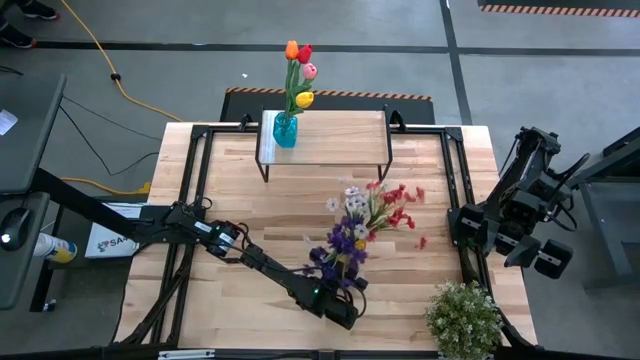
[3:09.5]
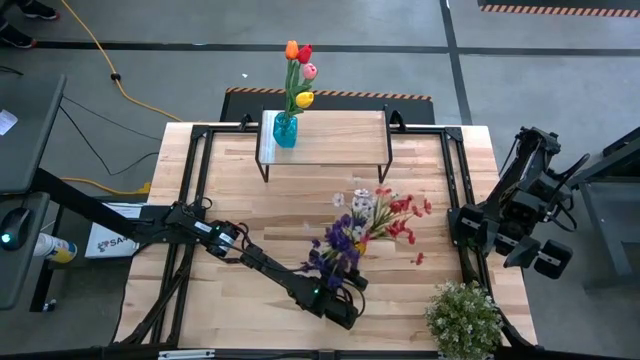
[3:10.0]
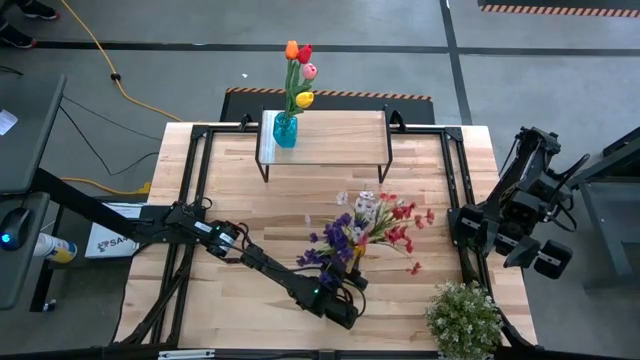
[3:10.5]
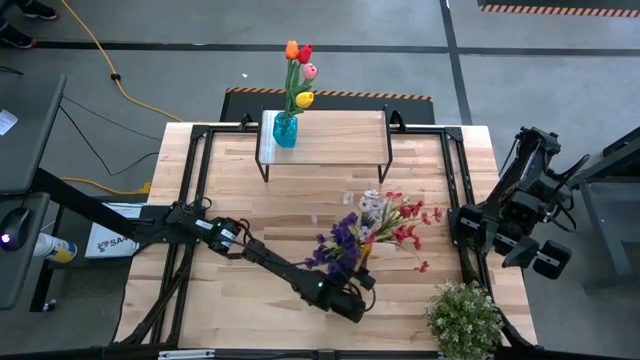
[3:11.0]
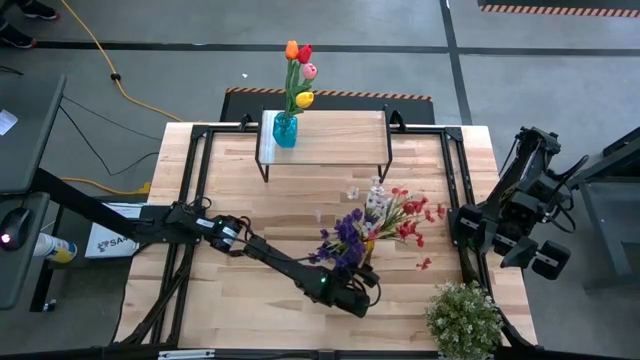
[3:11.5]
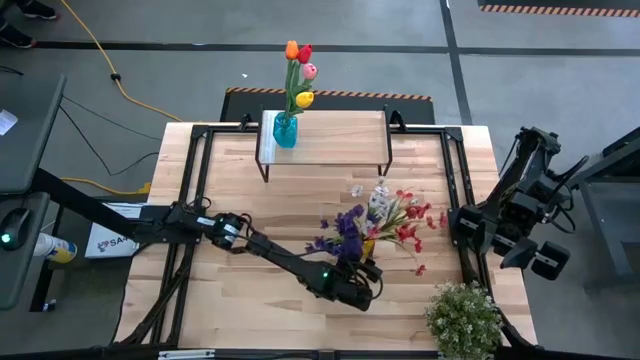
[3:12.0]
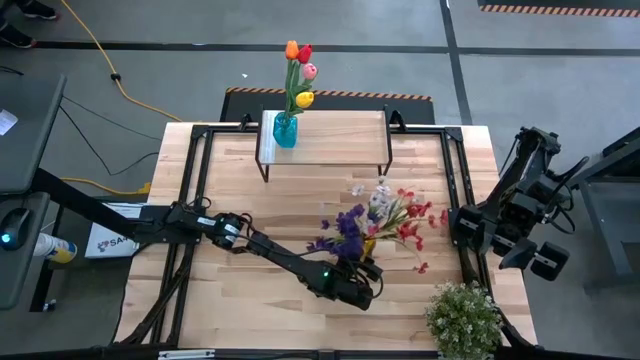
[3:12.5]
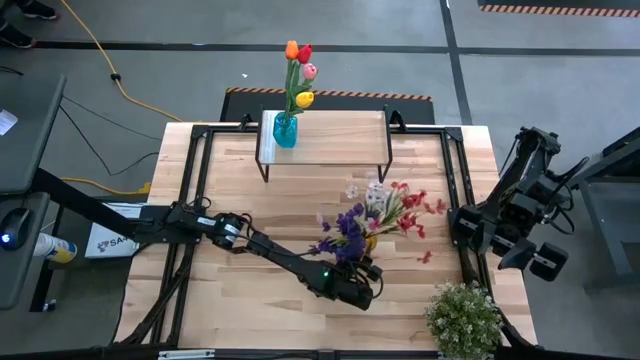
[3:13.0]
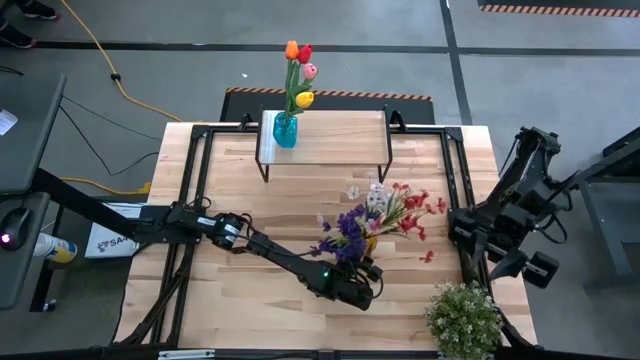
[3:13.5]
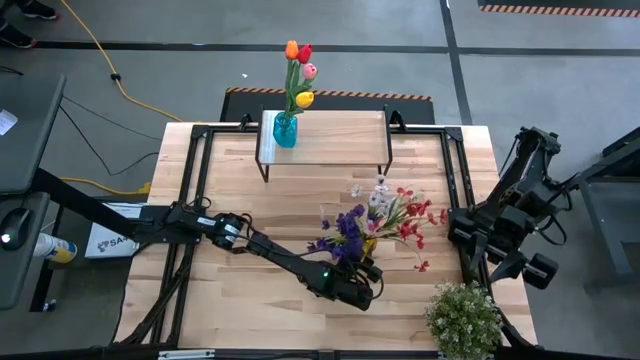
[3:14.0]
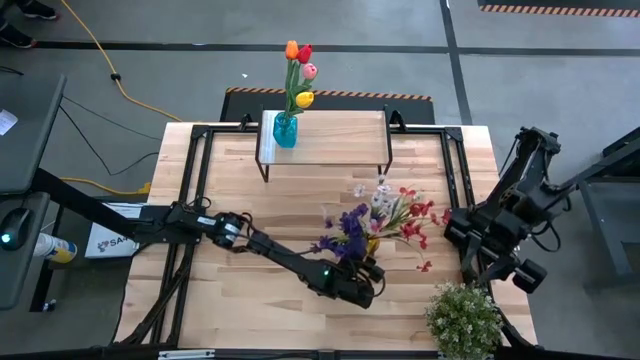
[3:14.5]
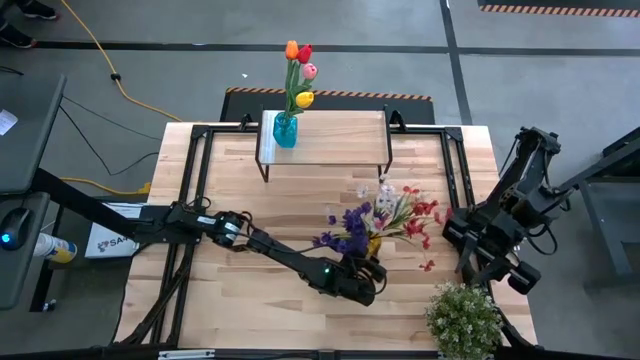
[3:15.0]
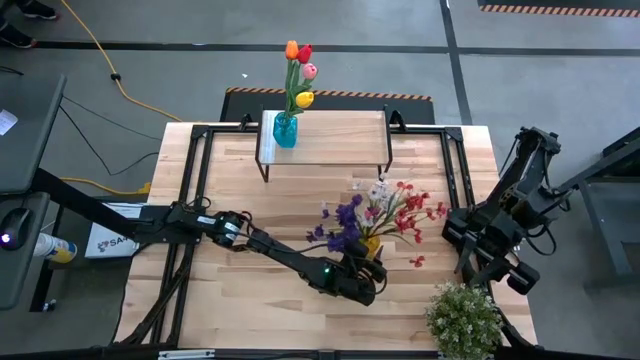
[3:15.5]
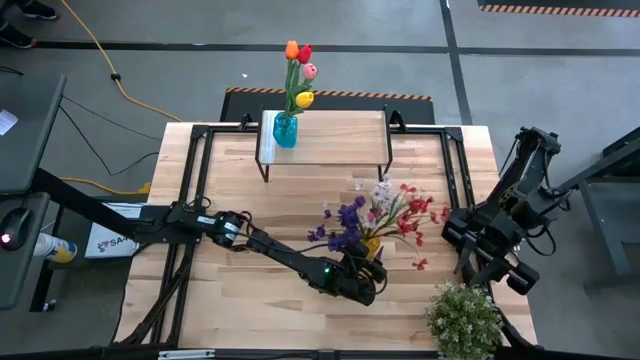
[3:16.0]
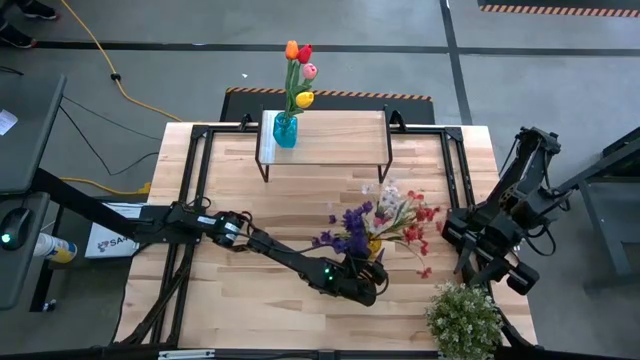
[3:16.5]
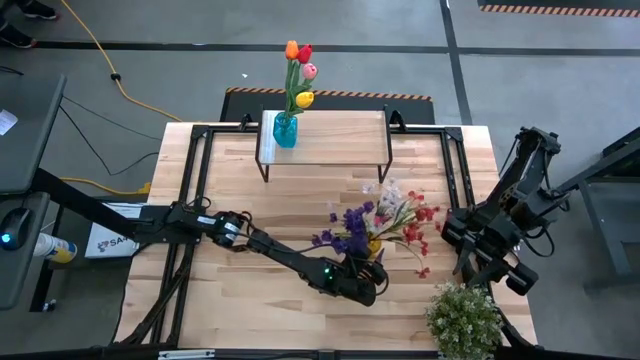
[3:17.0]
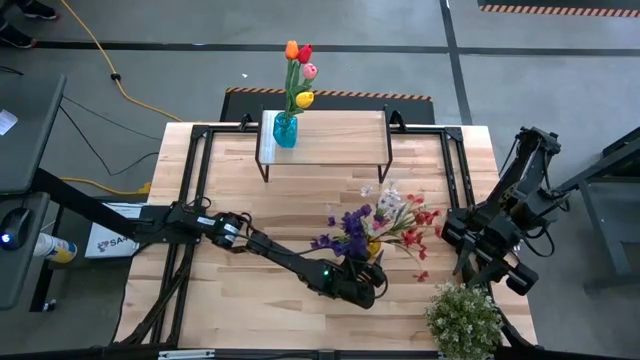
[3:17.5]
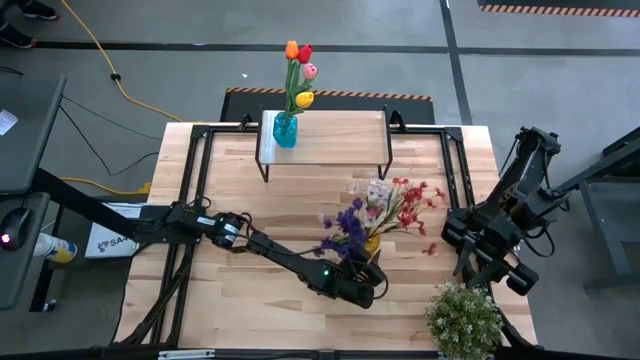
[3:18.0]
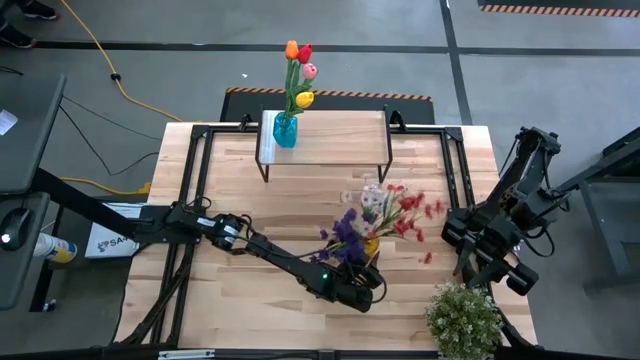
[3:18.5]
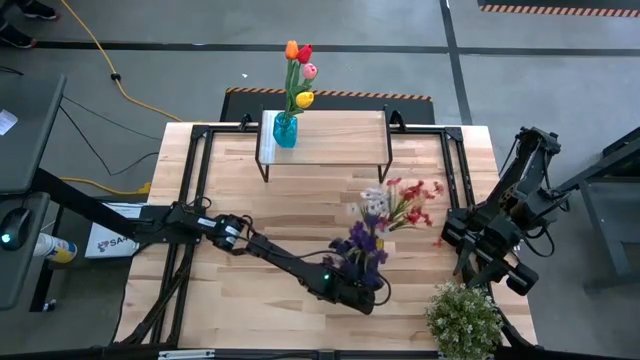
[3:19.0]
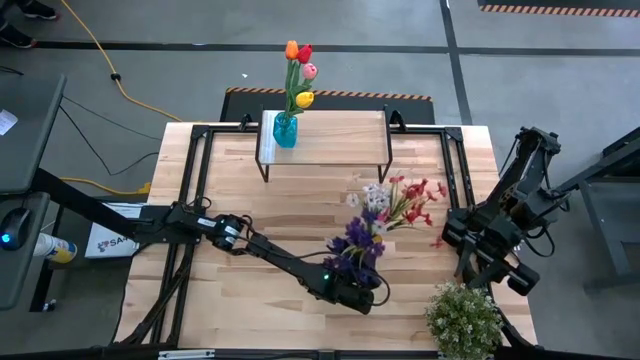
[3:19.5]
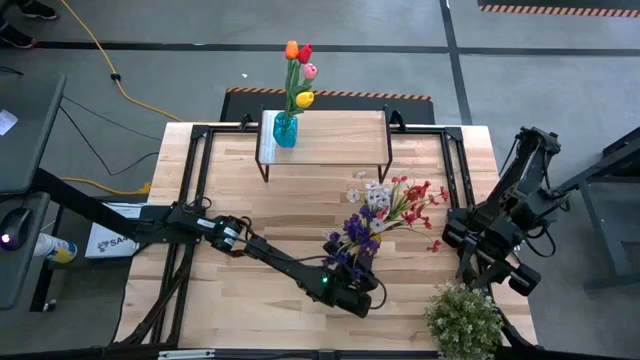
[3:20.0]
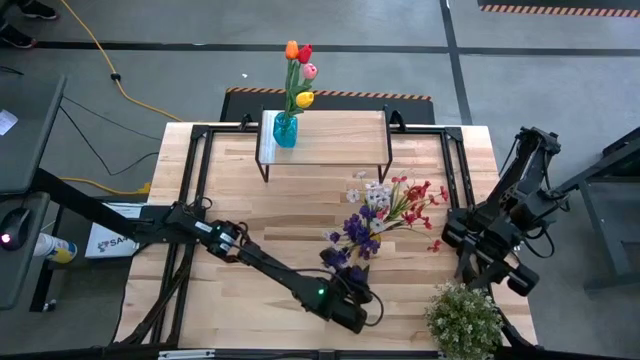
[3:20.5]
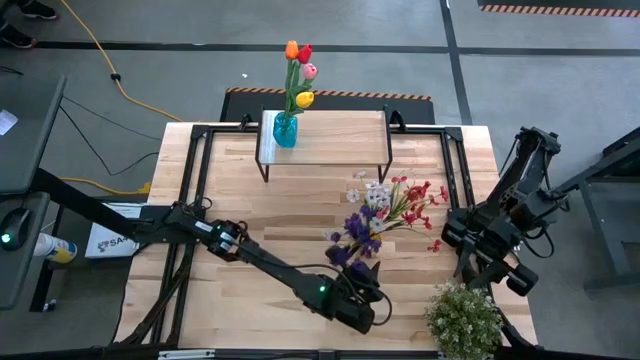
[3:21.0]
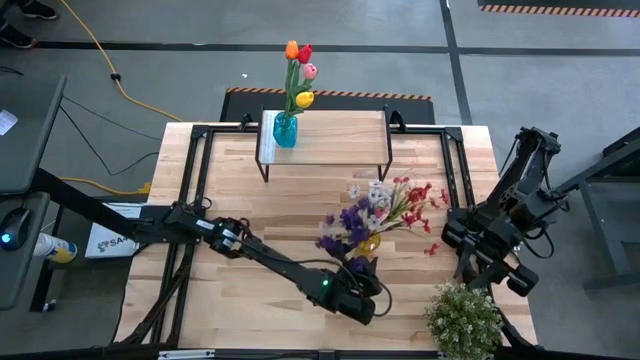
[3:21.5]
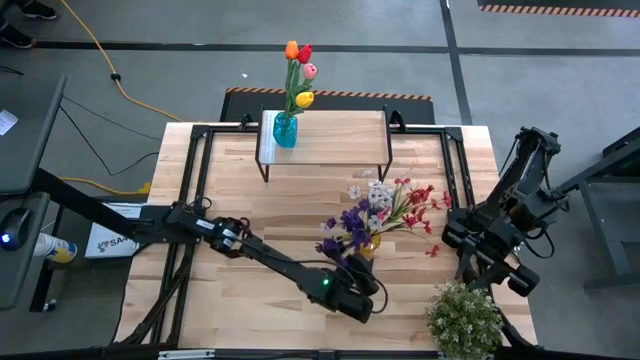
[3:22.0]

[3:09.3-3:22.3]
Task: Pick and place flowers into a vace then onto a shelf
Put the yellow flower vase on the shelf

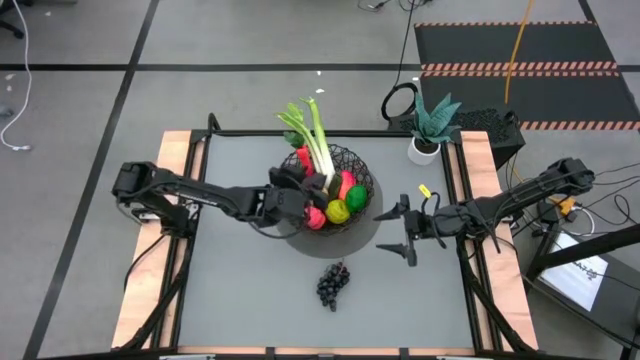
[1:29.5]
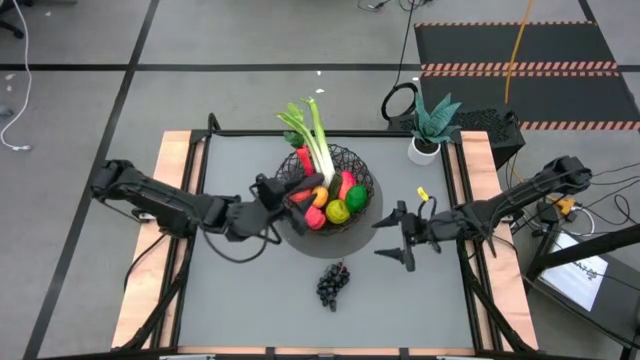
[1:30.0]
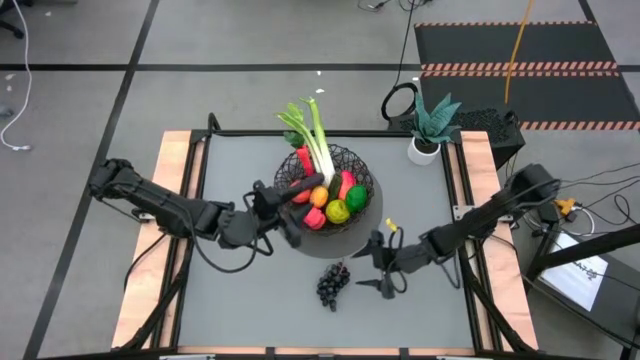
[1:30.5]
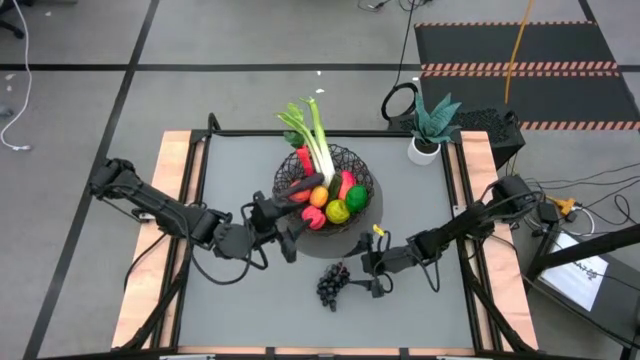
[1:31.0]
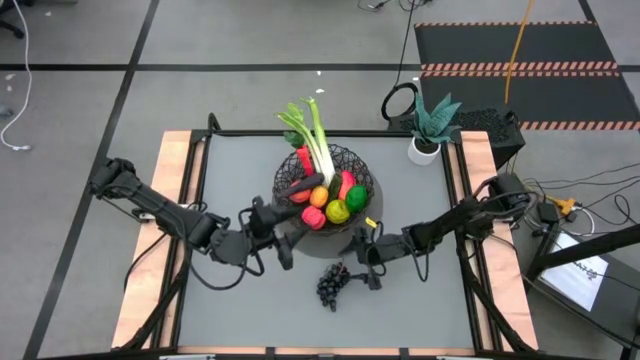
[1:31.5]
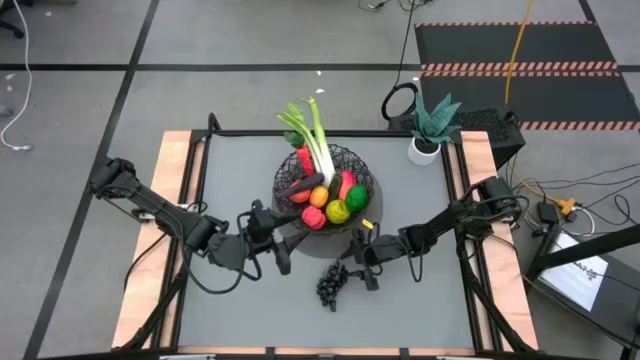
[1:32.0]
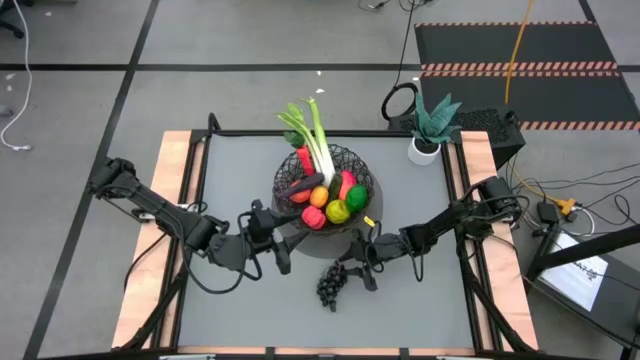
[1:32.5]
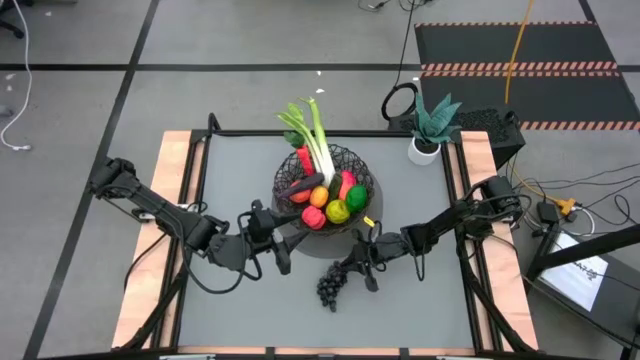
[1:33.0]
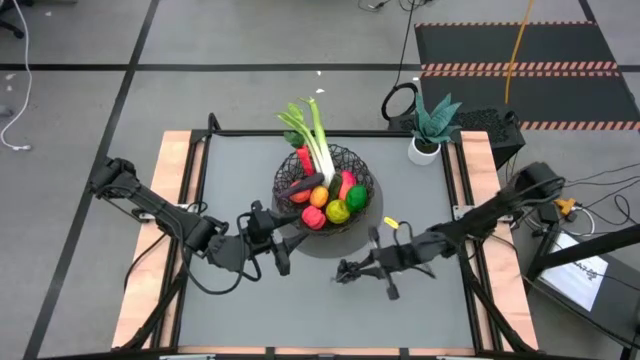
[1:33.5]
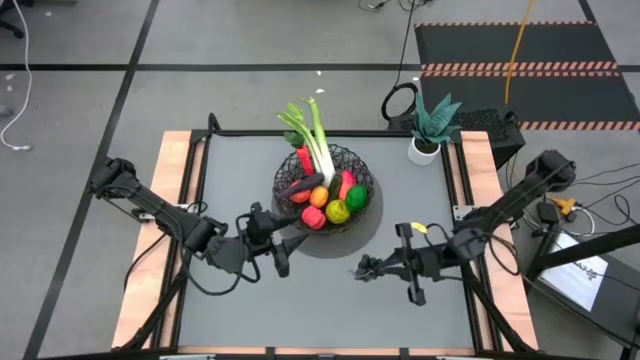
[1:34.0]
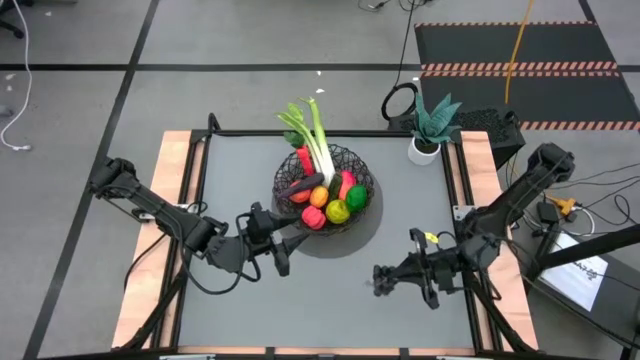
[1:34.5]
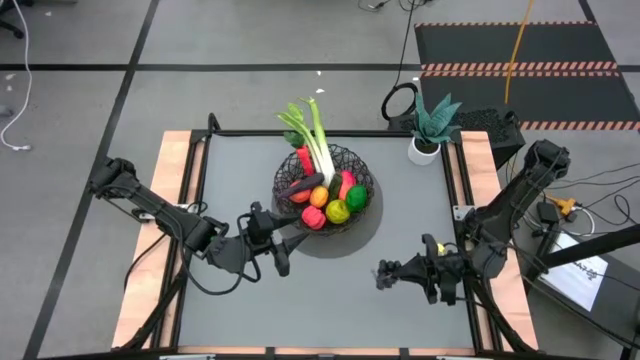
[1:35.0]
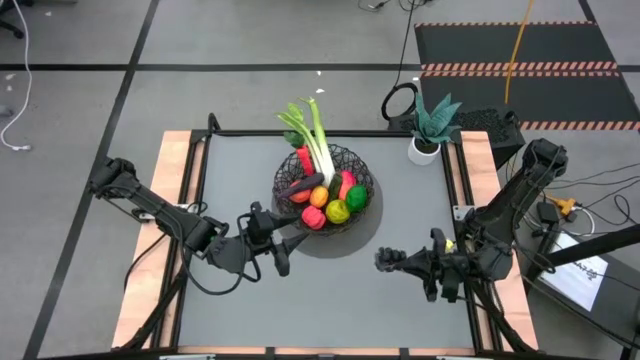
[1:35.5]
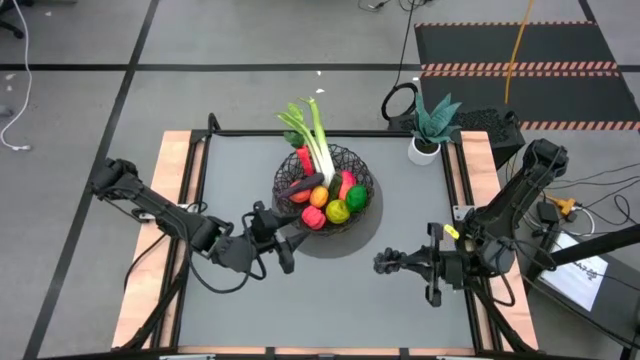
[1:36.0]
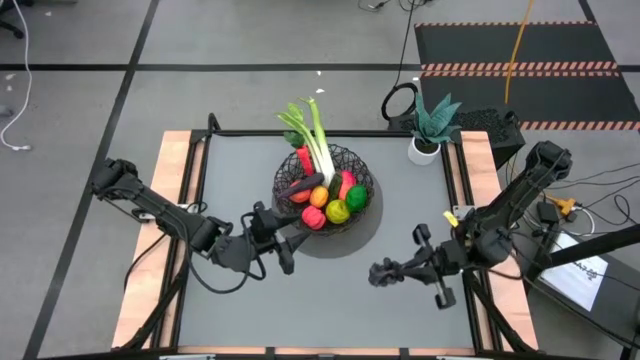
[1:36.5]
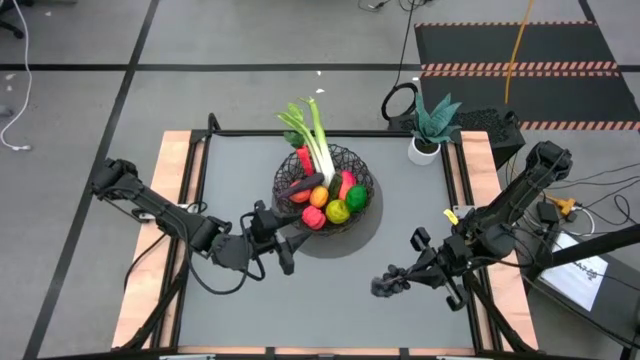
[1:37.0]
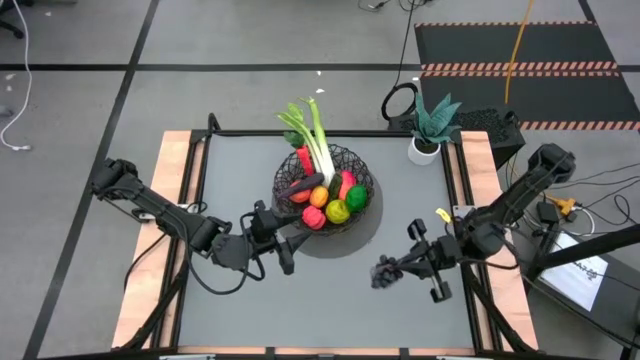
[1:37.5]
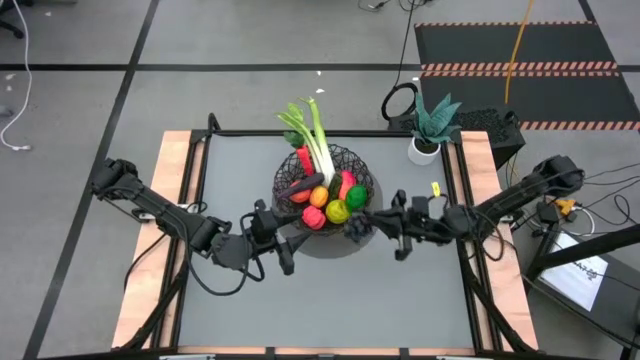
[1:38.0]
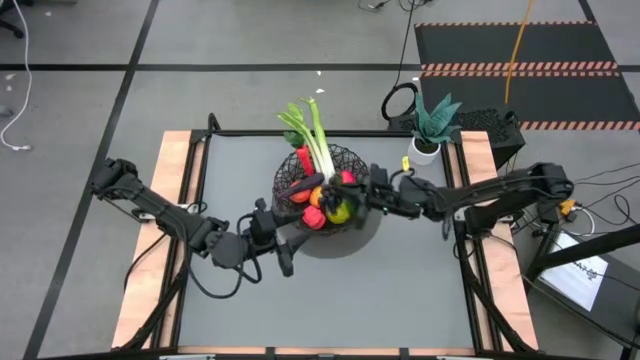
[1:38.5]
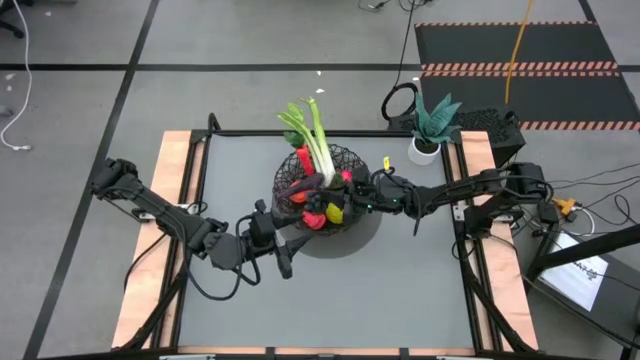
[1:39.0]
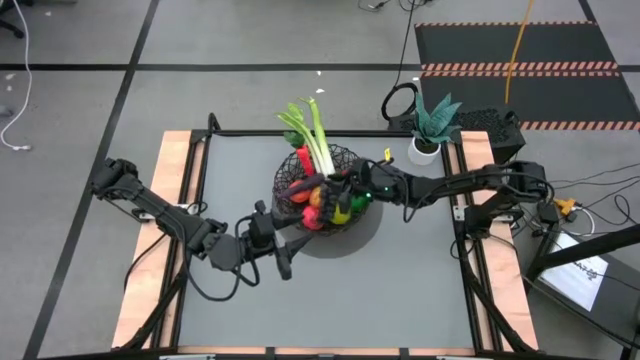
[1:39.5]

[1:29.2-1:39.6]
Task: Build produce basket
Put the black grapes into the black woven basket
